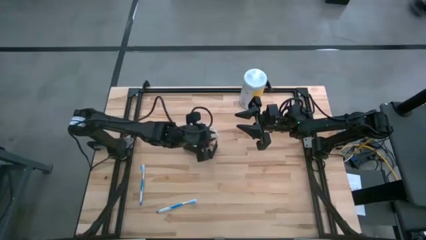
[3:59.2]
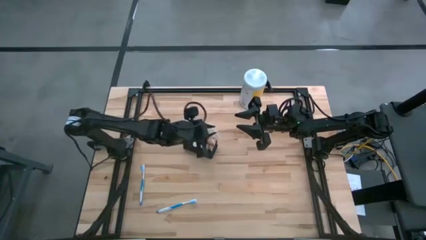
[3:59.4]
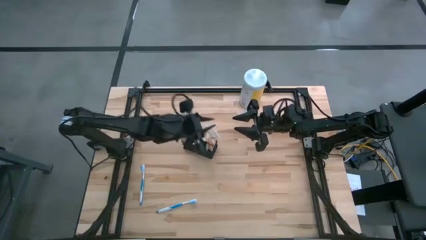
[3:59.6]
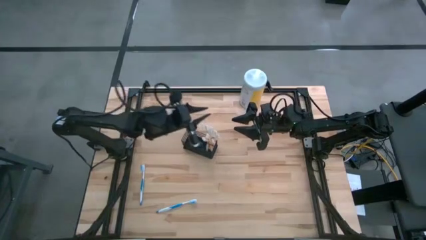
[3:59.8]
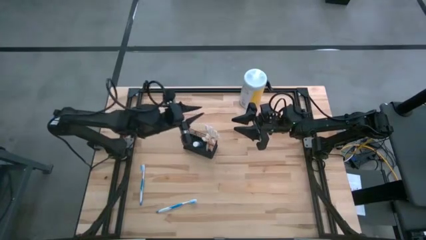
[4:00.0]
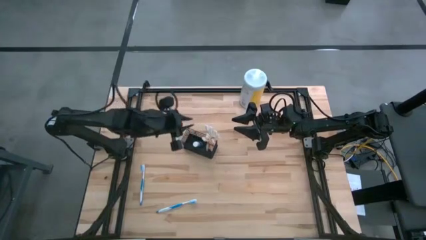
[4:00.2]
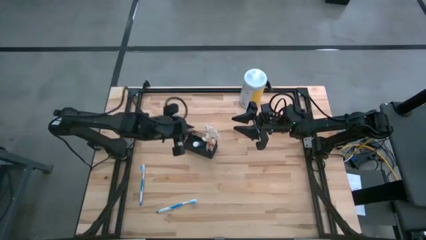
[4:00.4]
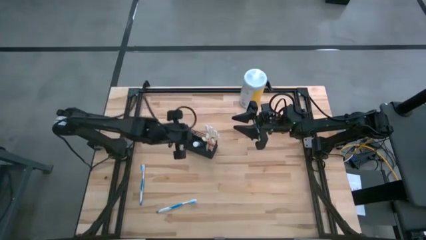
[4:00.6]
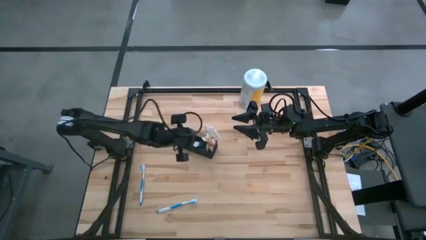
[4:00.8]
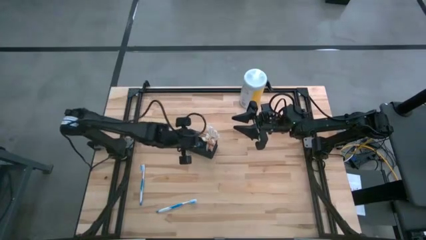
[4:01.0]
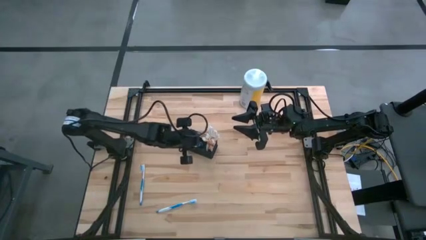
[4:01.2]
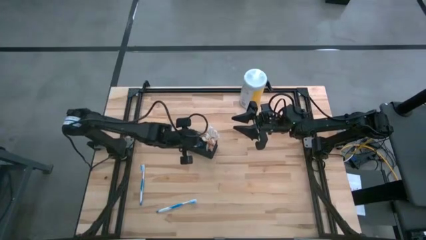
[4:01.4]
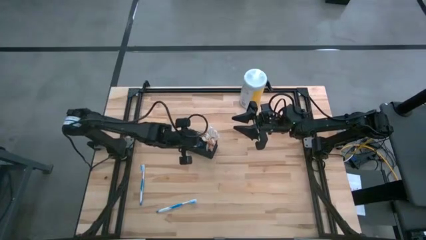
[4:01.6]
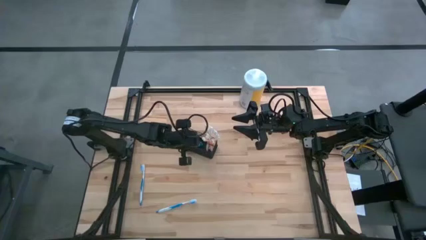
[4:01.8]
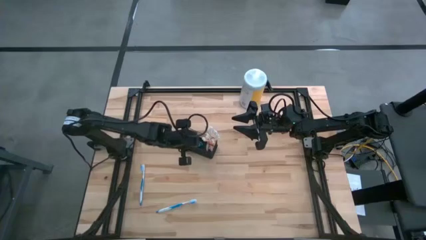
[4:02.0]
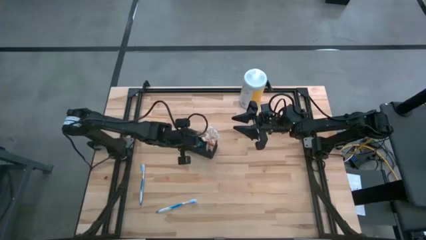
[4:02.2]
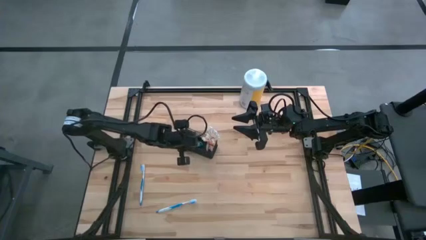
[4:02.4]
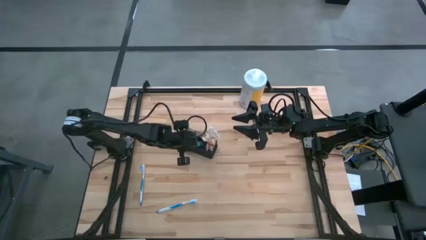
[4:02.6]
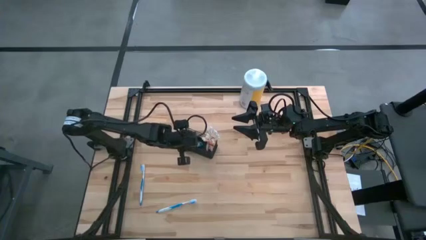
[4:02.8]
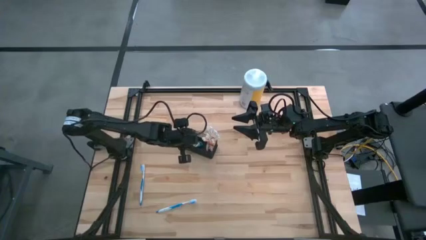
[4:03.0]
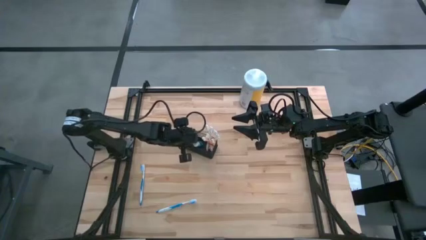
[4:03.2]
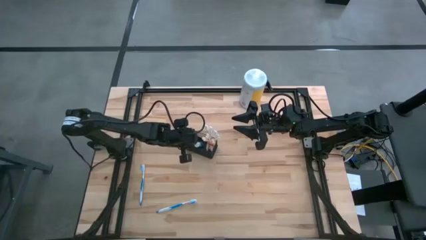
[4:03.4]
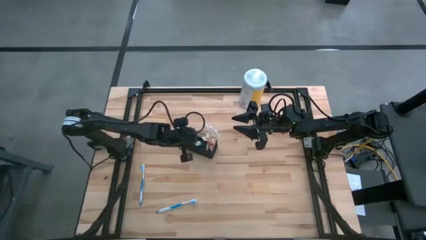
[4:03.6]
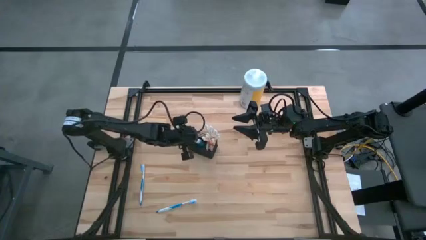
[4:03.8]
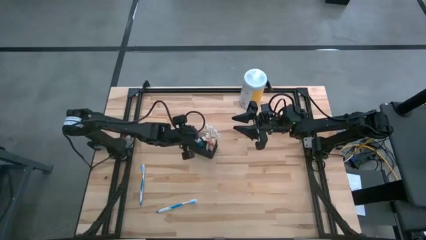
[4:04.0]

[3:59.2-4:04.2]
Task: Pick & Place toothbrushing station
Adjust the blue mouthwash in the wire organizer

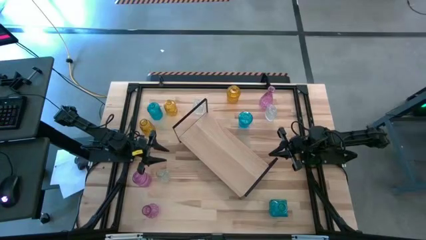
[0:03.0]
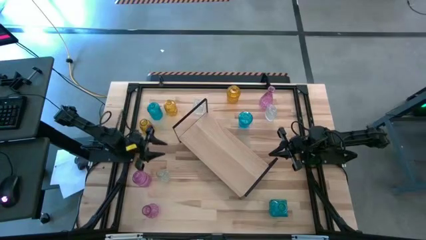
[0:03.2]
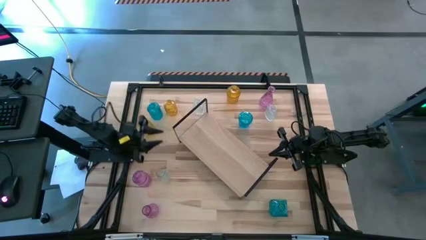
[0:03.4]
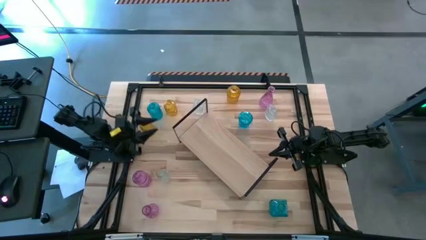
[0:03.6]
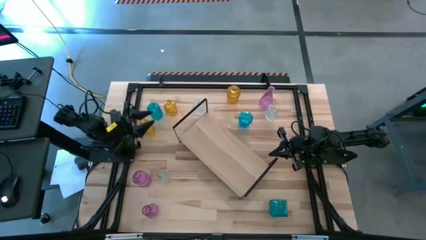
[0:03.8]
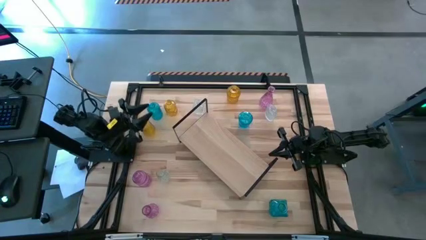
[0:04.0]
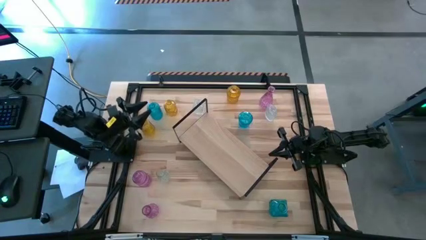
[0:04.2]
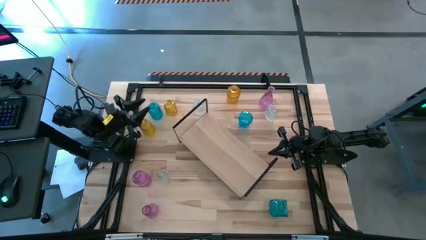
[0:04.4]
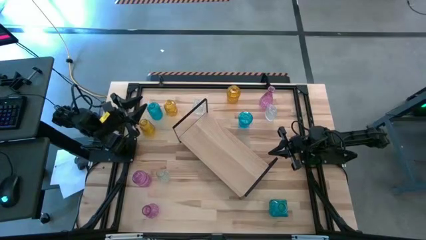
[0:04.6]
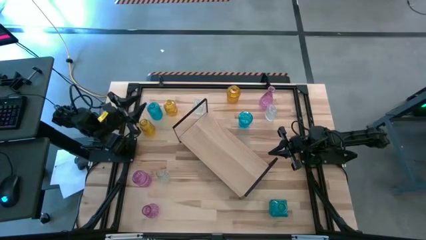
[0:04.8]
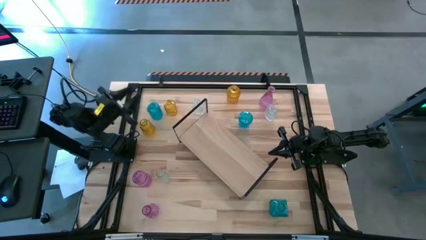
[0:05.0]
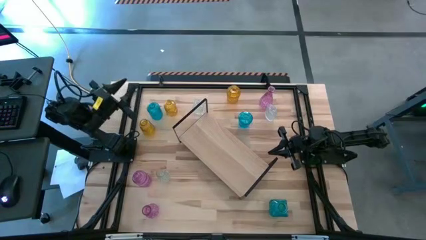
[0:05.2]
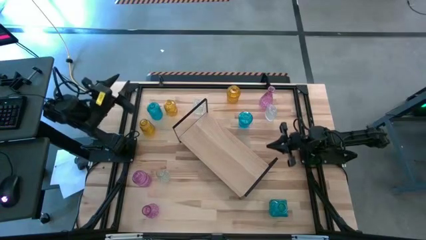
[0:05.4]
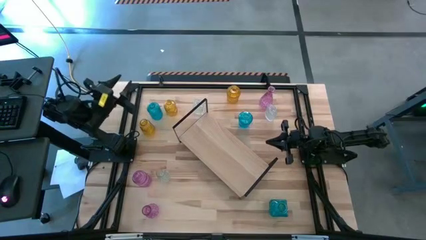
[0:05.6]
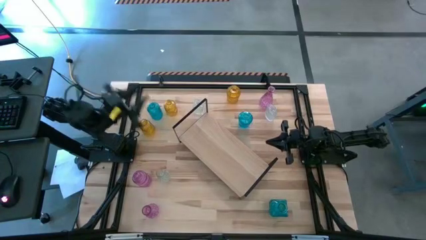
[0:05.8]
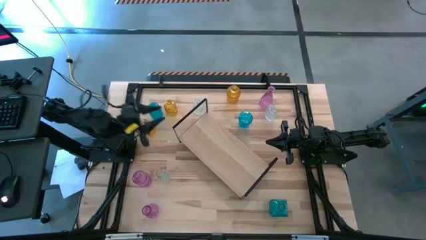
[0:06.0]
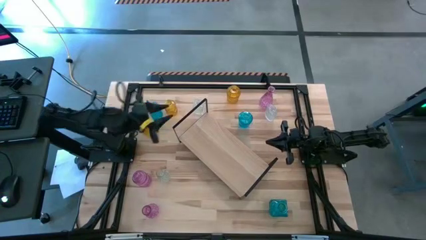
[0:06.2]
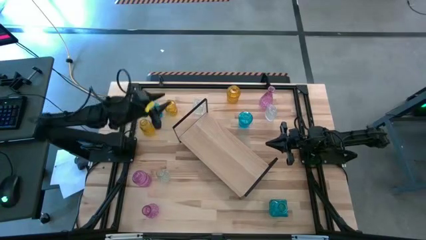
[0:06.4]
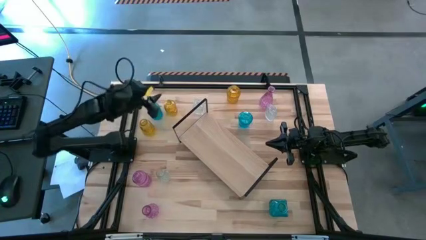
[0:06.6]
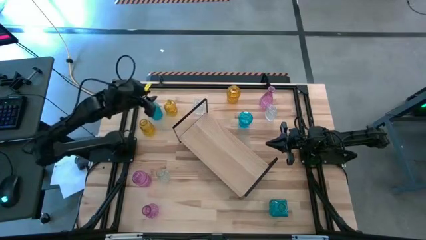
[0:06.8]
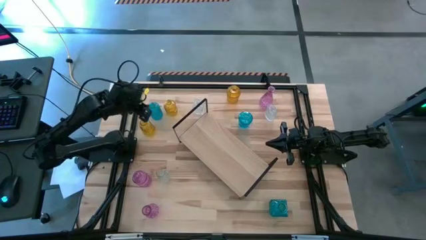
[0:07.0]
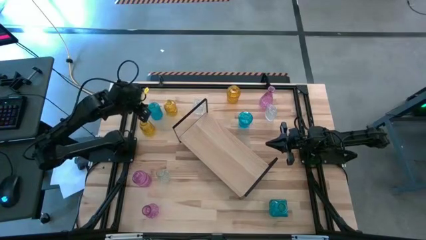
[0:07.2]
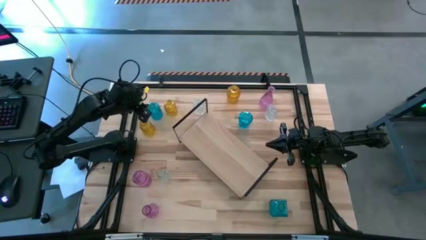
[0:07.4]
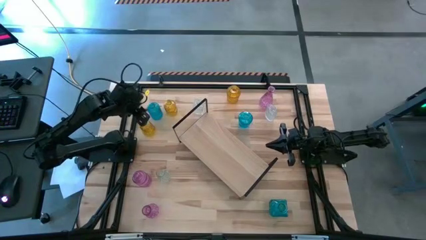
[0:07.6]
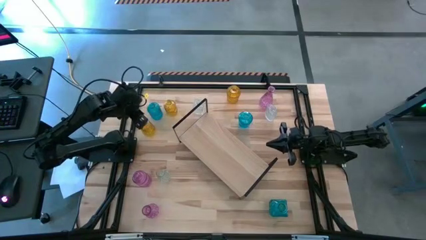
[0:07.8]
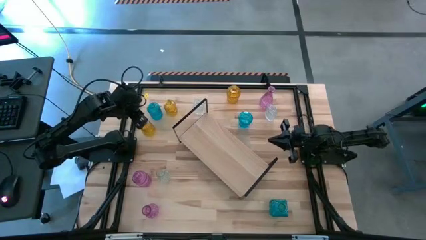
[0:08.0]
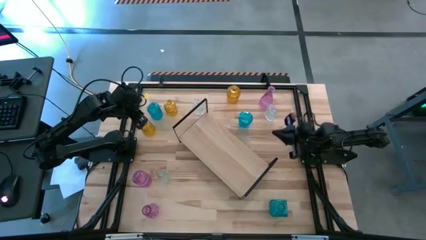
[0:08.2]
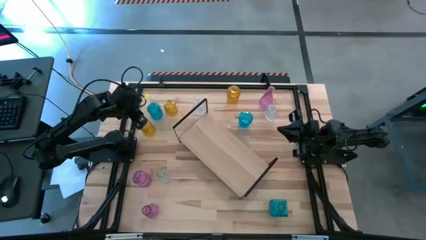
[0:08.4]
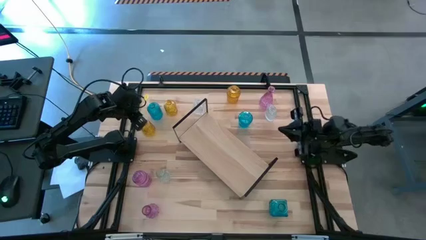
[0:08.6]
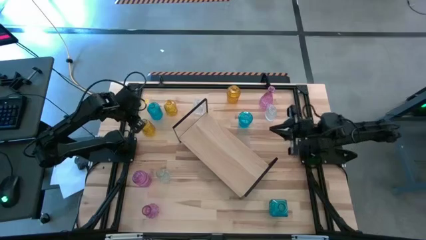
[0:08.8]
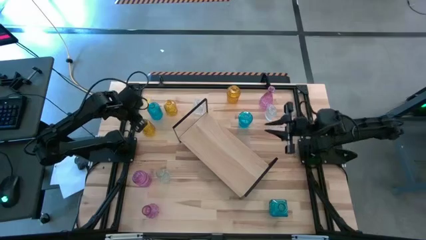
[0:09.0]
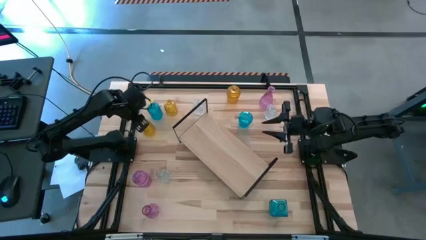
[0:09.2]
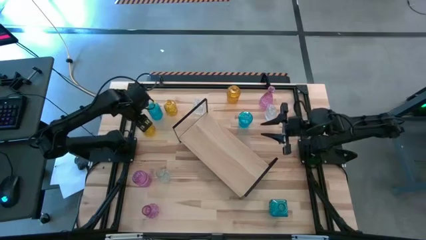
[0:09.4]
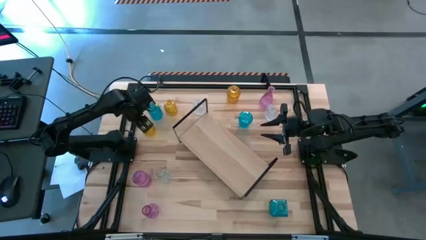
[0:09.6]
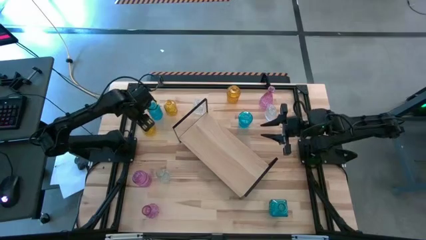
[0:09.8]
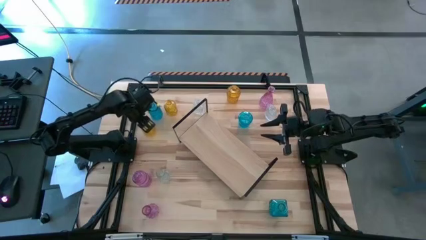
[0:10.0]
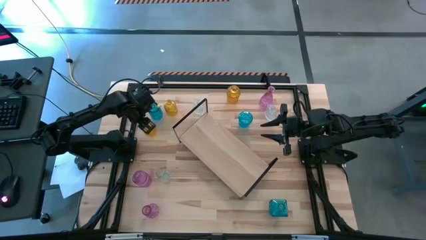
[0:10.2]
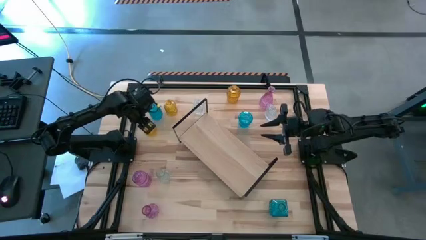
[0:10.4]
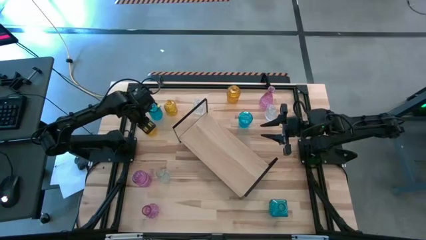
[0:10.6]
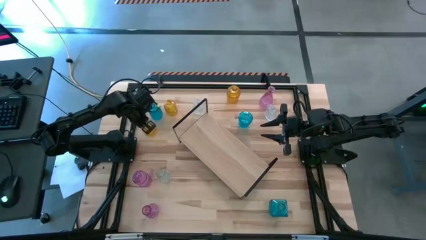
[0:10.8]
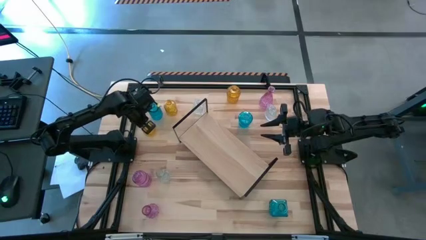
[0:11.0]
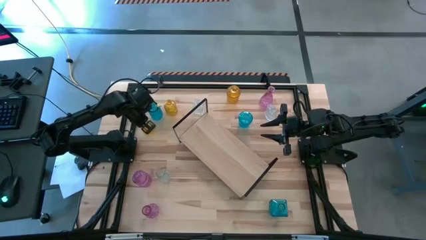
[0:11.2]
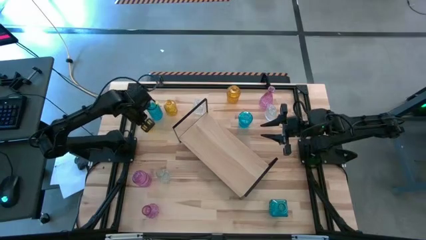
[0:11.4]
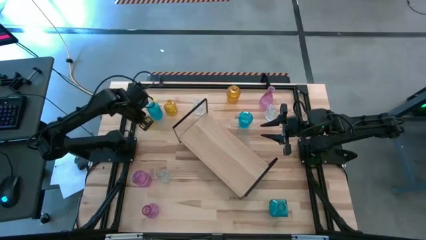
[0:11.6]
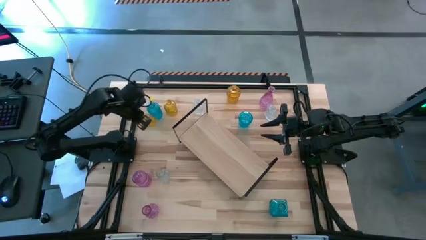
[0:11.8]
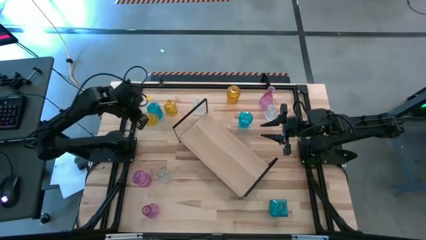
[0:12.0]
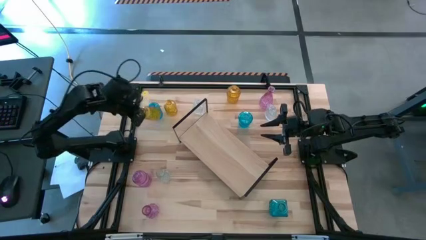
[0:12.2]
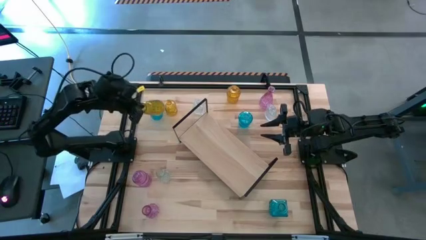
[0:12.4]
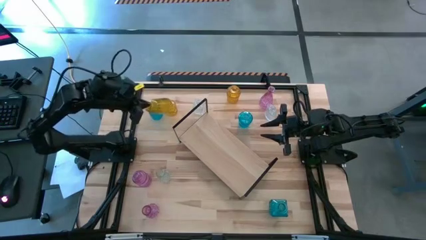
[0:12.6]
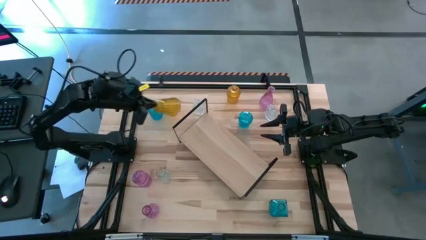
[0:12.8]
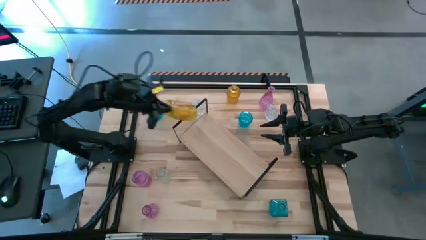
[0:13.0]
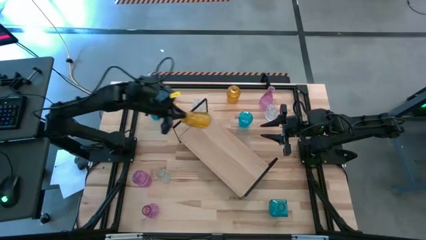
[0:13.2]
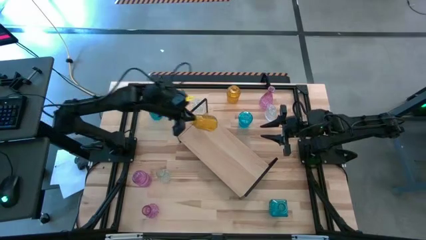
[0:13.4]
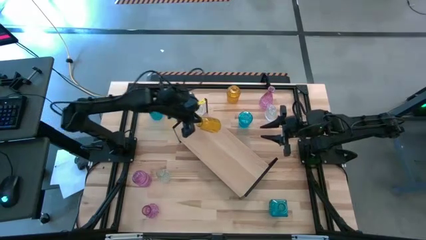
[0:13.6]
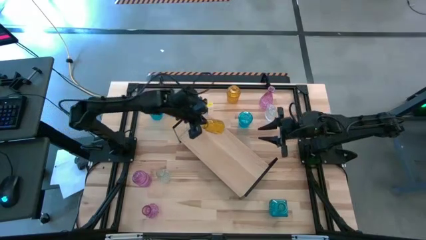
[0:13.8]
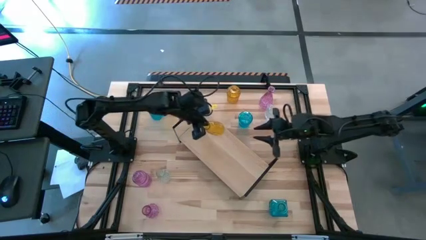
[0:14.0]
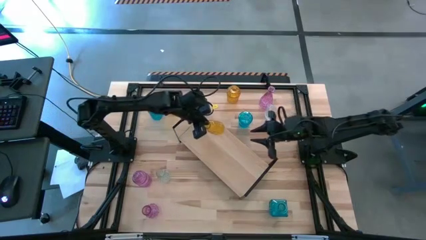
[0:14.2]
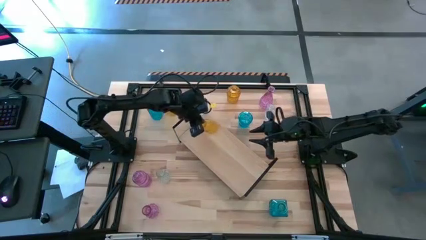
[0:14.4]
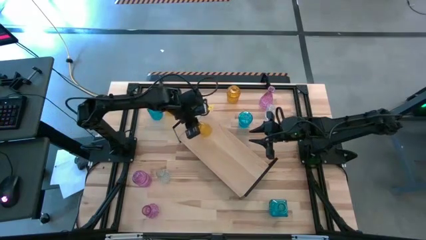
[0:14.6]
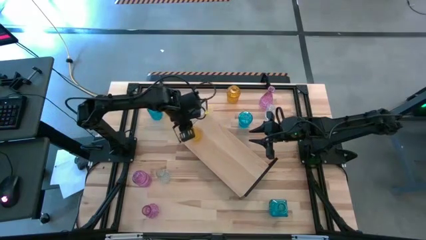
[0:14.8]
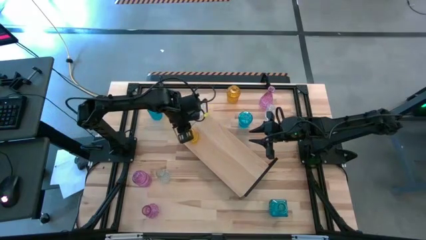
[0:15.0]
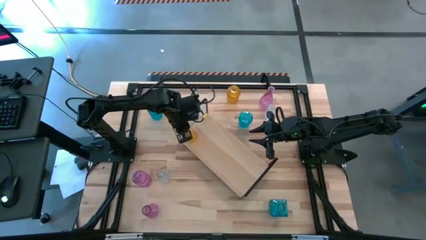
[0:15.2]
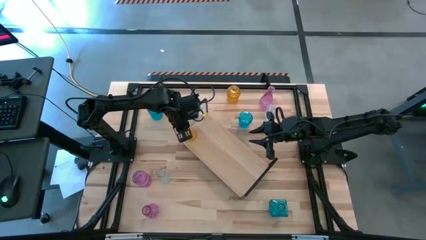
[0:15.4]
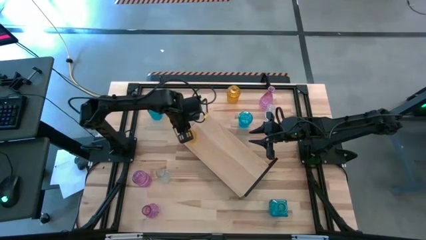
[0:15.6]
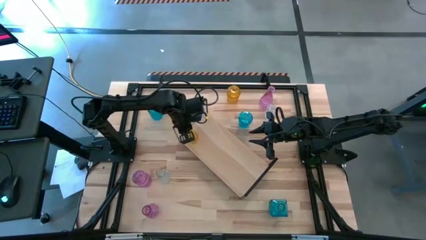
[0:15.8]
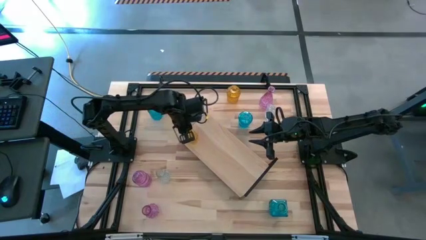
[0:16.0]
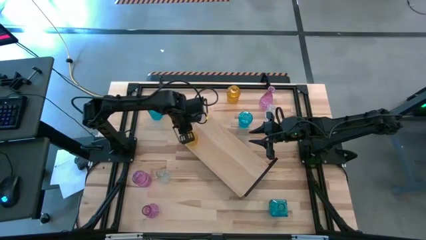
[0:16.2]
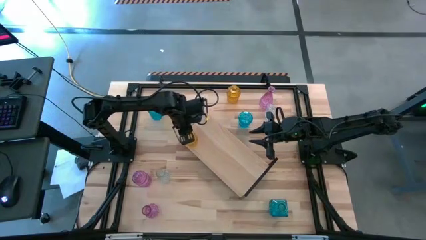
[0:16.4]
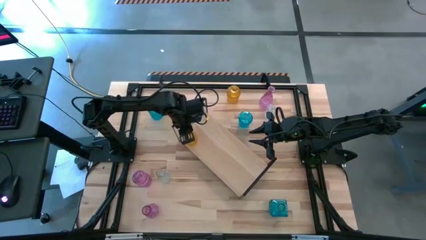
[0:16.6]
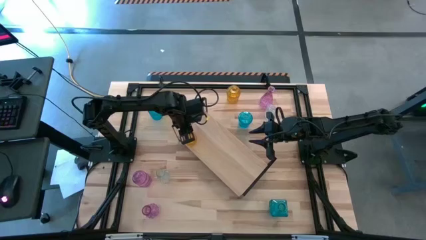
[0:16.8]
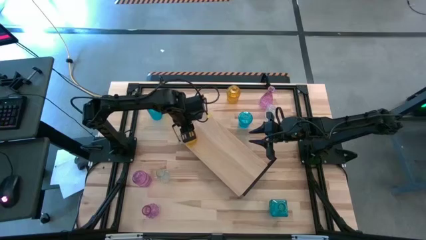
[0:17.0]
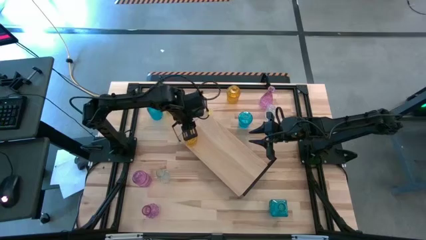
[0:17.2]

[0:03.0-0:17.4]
Task: sort vases onto shelf
Put the bottom left yellow crystal vase on the shelf
